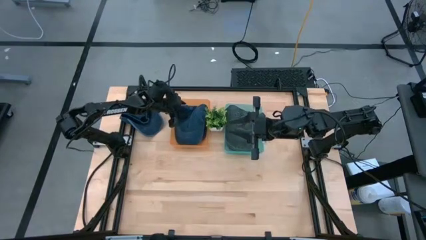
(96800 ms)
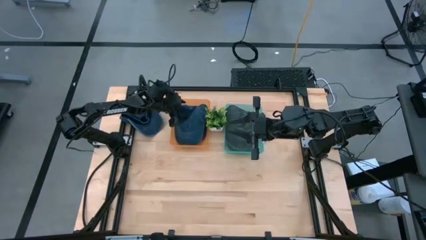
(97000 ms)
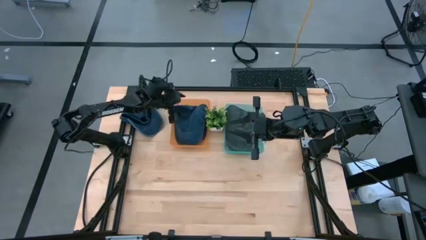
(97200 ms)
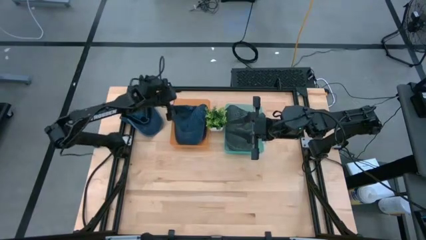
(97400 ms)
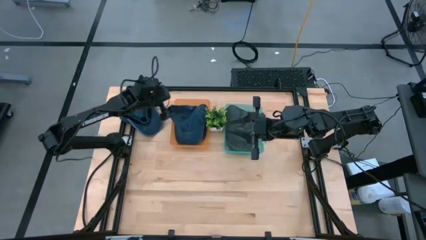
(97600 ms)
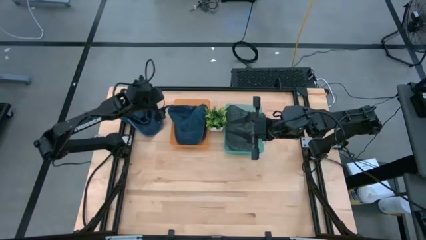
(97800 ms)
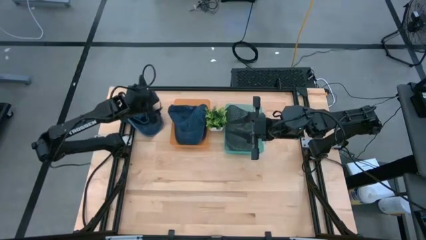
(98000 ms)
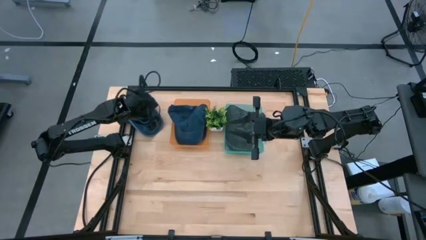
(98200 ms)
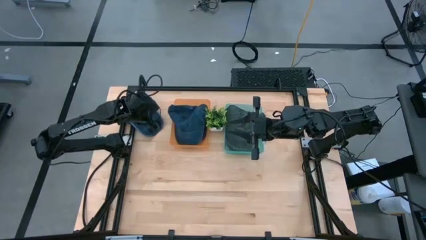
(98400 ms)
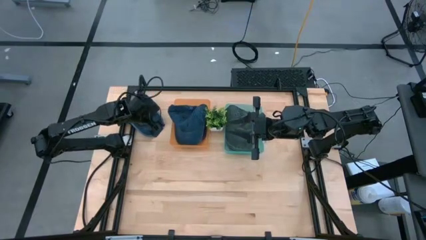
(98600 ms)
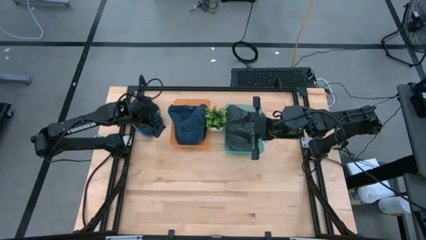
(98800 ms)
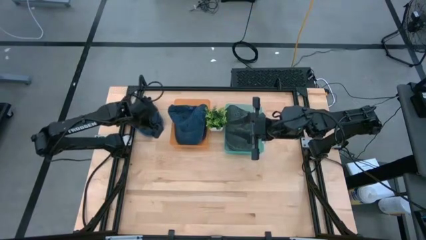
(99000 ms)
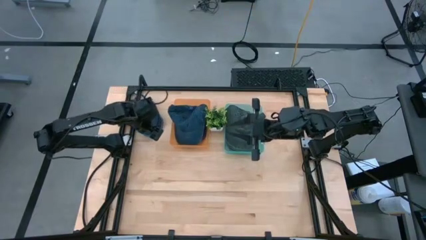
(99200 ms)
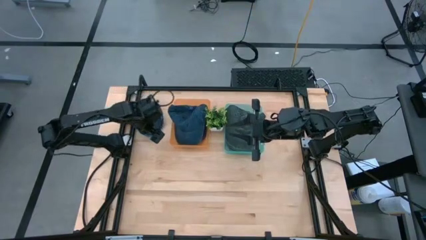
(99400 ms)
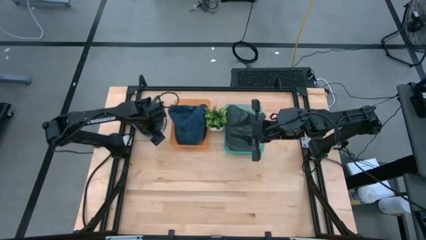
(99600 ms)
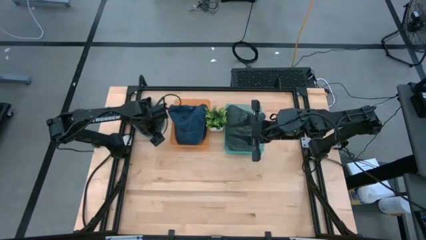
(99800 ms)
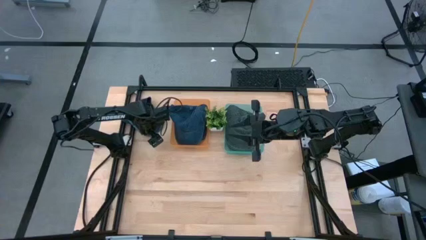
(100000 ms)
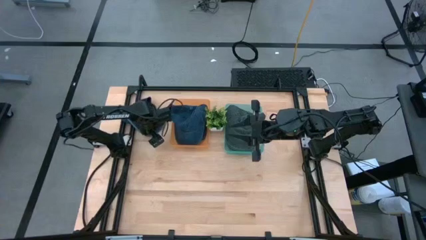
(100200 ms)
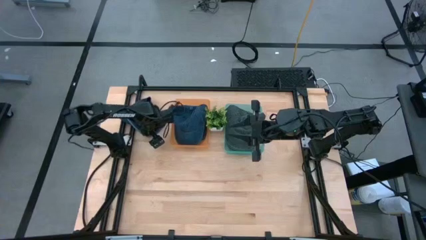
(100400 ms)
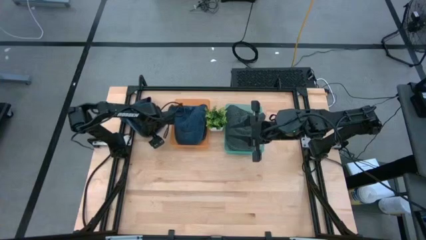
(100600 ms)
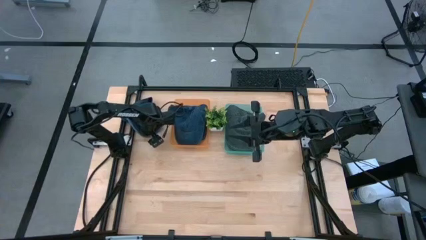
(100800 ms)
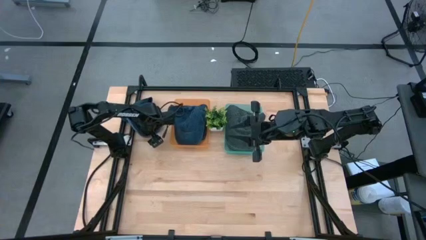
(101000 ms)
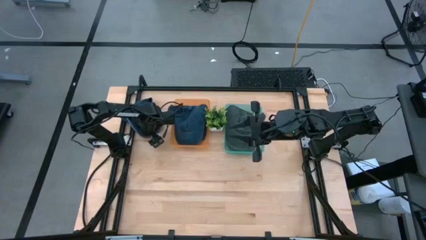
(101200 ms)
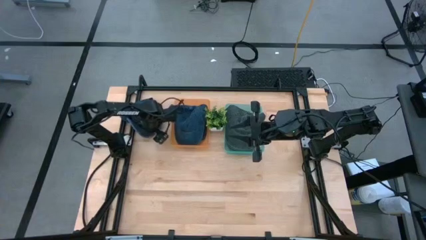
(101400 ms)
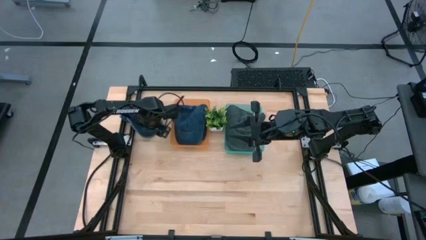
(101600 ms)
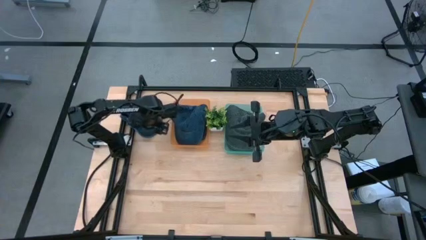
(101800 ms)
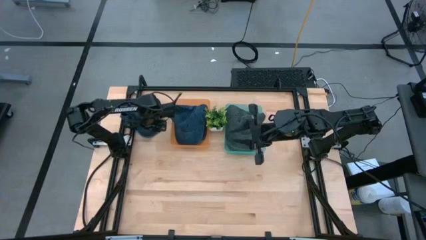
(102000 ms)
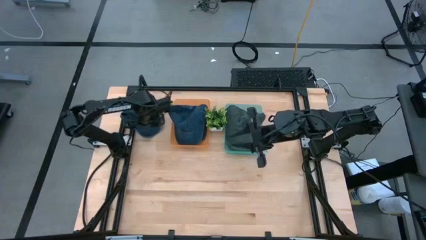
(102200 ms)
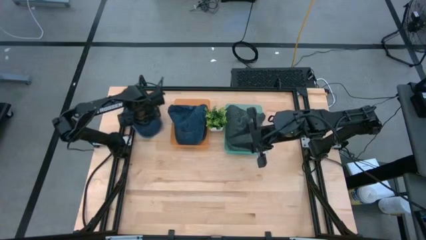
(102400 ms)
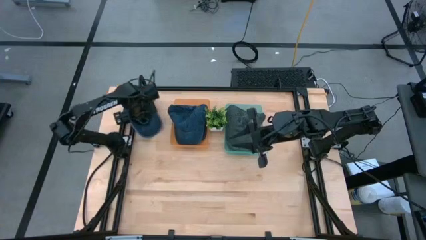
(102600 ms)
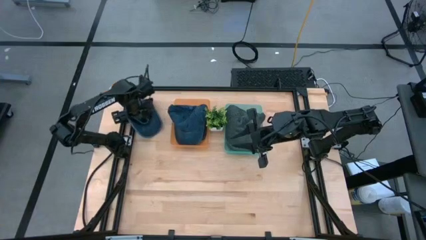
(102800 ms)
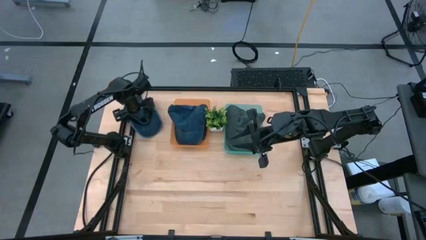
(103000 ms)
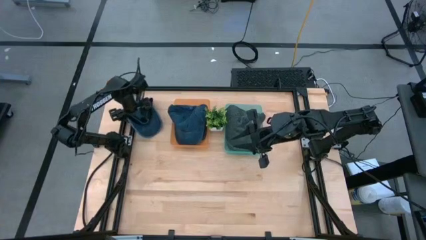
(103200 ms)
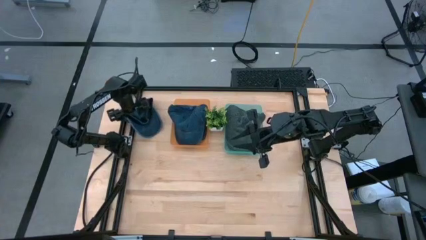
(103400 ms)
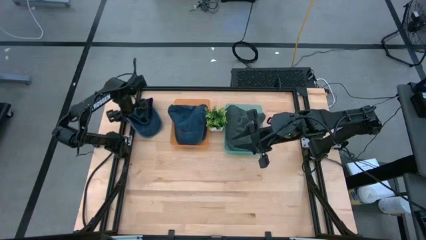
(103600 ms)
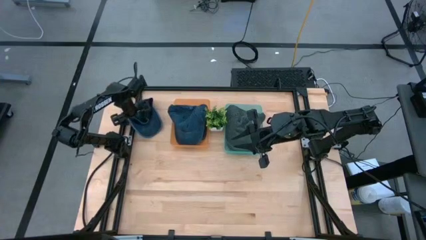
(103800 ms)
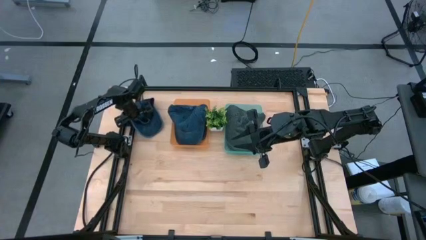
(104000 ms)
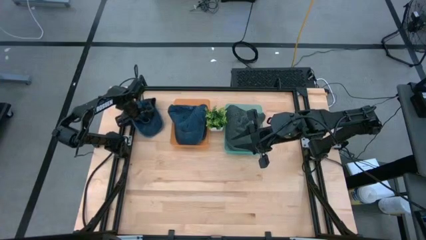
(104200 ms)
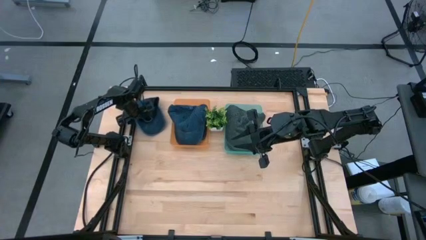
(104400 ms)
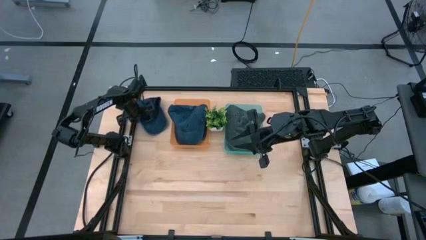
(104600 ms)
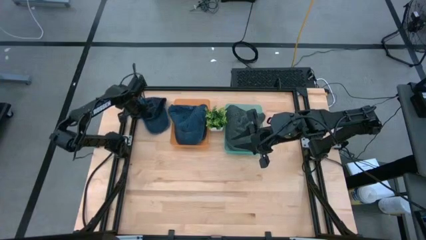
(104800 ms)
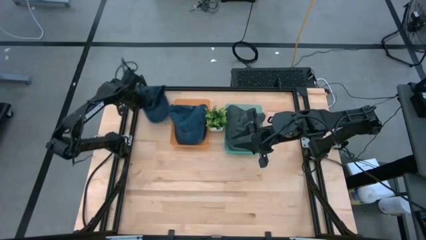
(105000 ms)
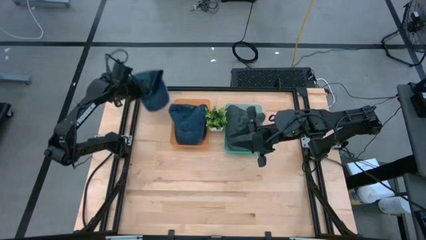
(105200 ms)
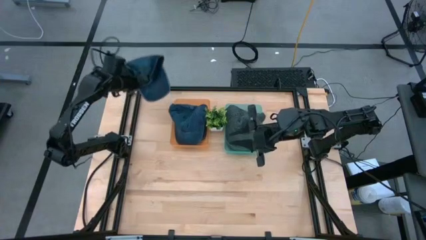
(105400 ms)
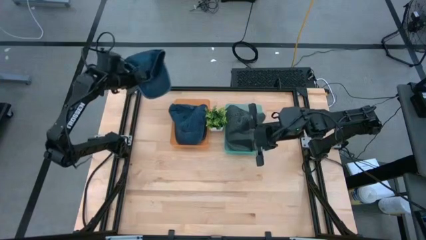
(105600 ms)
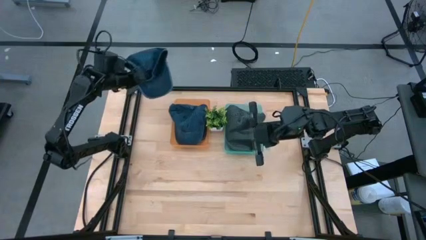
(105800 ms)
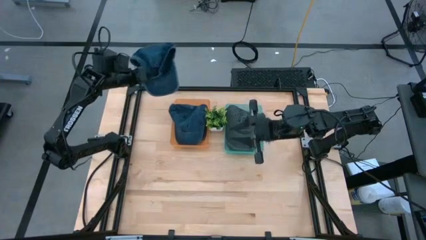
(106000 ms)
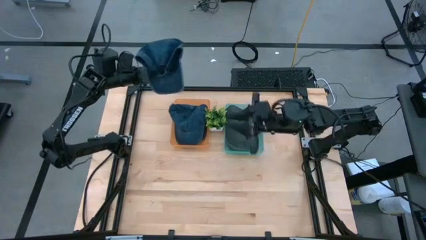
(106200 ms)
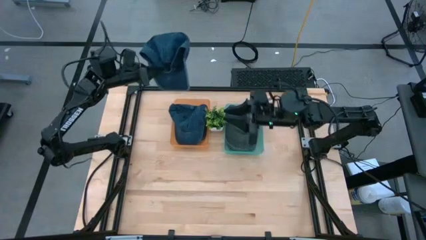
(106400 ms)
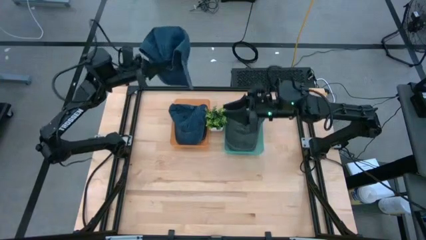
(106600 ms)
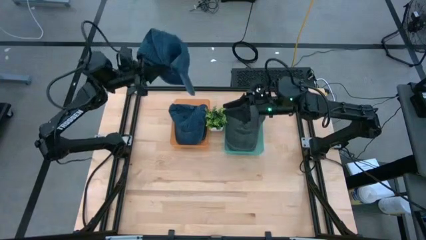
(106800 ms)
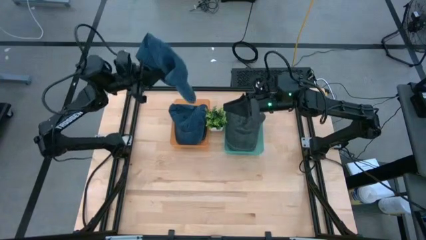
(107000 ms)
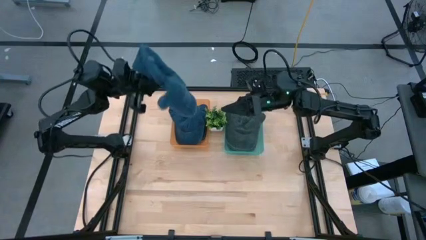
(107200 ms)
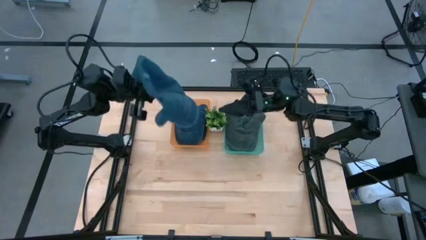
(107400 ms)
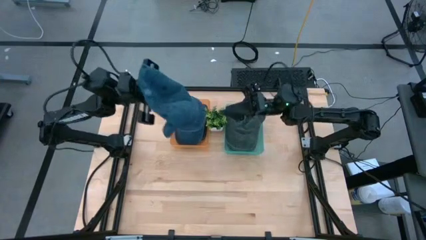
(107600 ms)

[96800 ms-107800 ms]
Task: Pick & Place hat
Put the blue cap into the orange bin

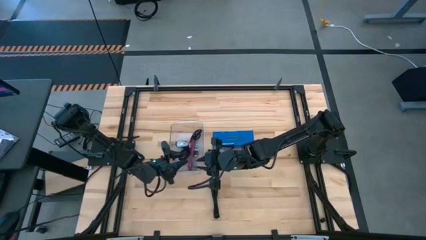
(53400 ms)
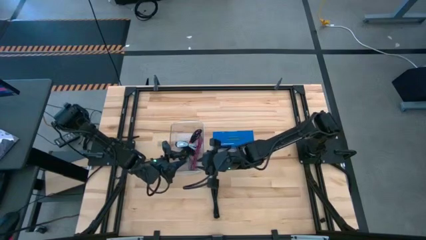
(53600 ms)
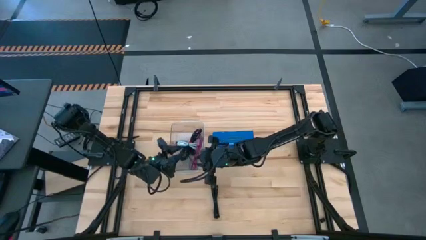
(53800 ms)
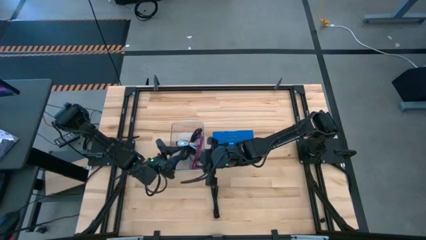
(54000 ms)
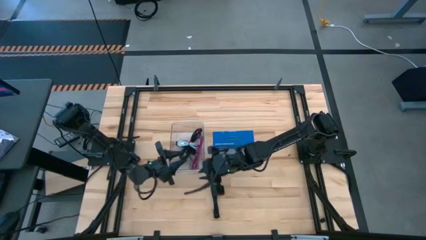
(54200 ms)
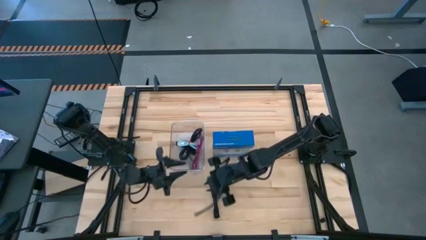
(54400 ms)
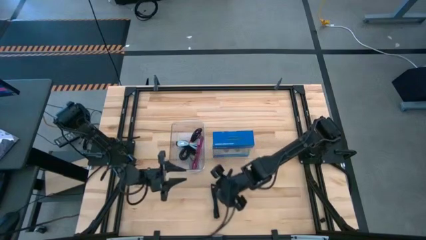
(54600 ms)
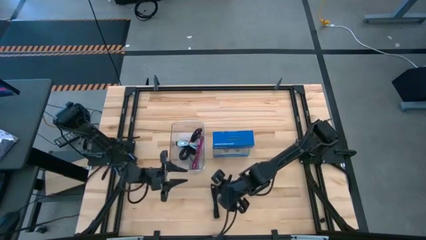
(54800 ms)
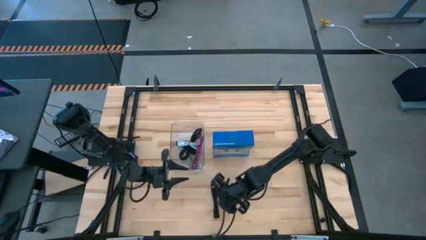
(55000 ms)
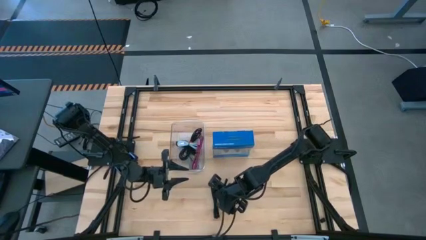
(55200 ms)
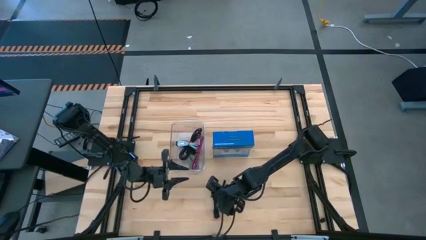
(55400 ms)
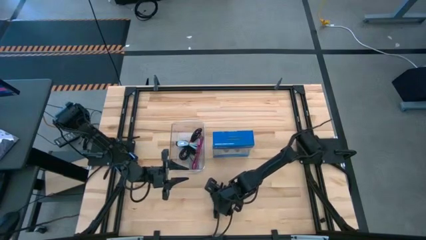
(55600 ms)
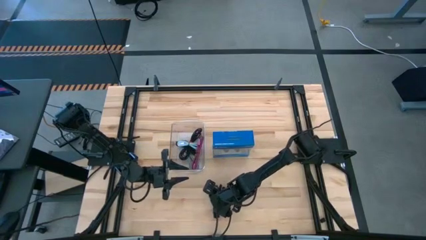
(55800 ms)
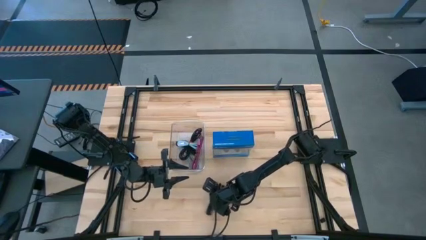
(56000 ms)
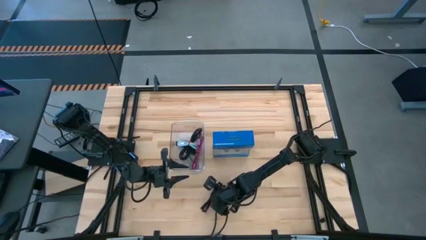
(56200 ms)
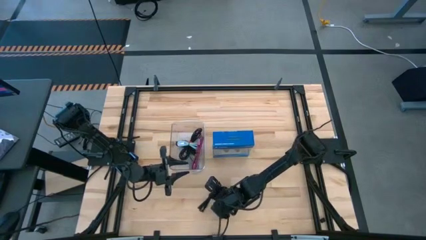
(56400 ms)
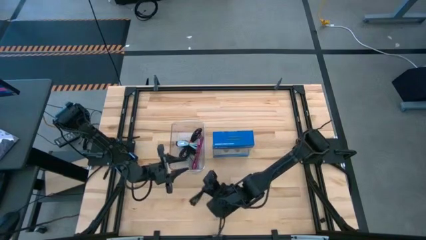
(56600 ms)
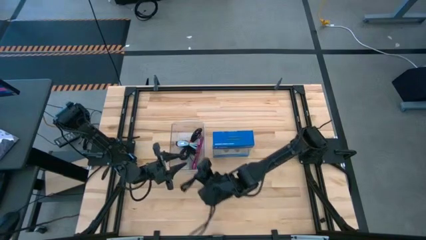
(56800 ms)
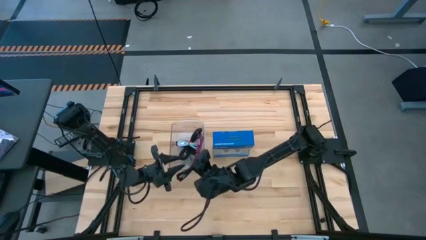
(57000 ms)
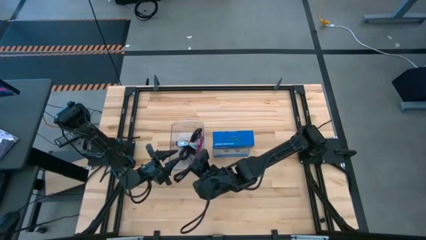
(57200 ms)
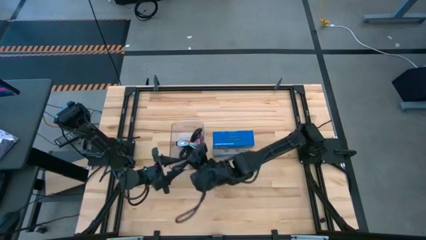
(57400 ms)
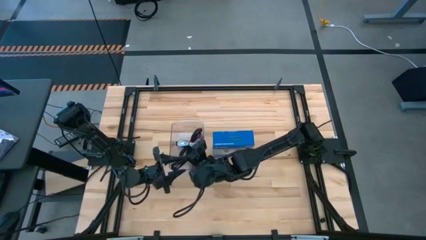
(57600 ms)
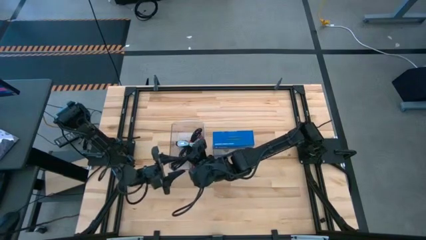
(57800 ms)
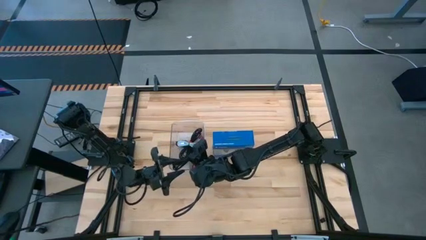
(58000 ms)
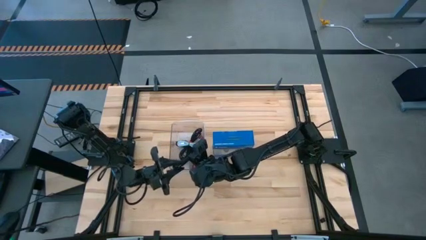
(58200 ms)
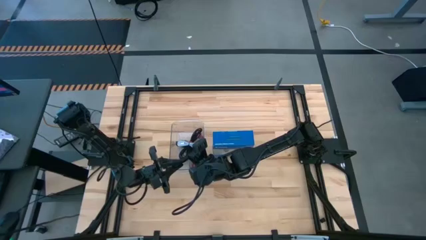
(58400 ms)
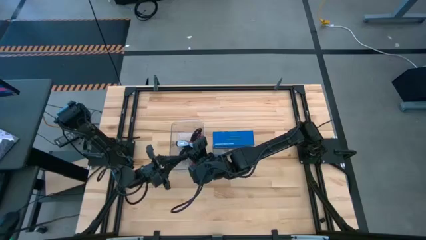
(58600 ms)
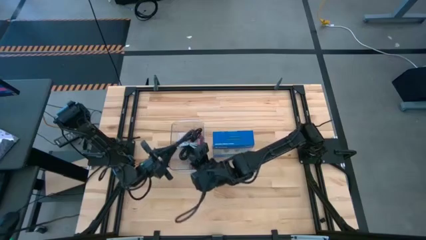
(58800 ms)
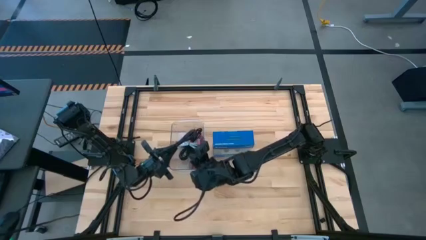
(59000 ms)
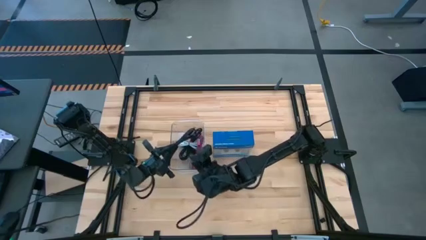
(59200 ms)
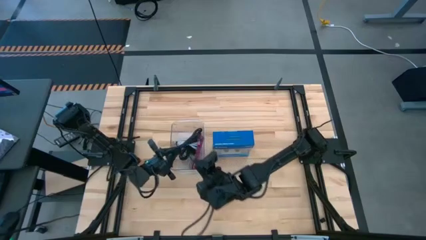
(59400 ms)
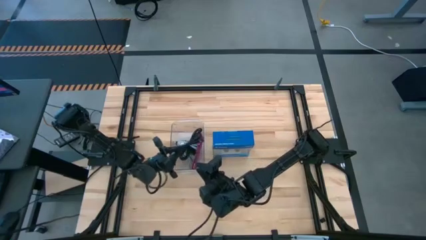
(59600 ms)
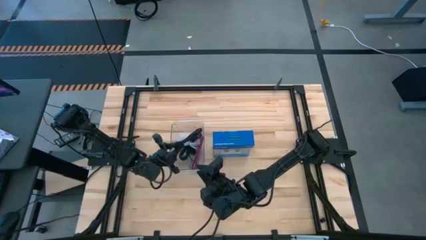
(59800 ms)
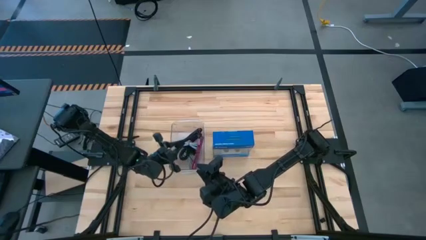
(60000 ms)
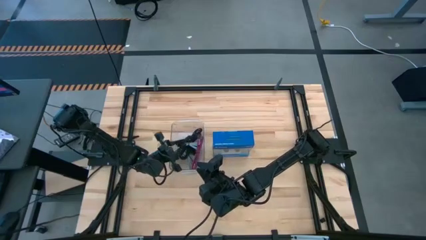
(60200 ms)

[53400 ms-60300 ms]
Task: Pick and place USB-C Cables
Put the black charger cable into the transparent bin
